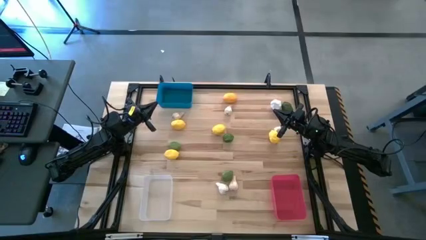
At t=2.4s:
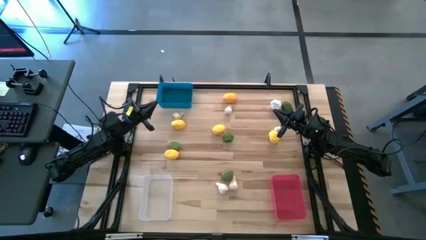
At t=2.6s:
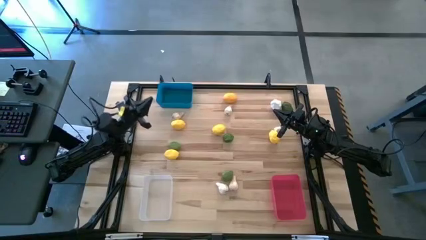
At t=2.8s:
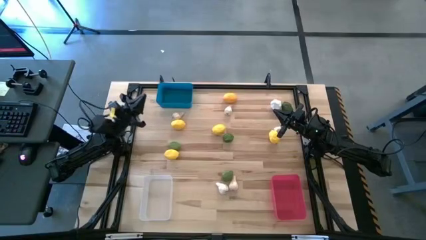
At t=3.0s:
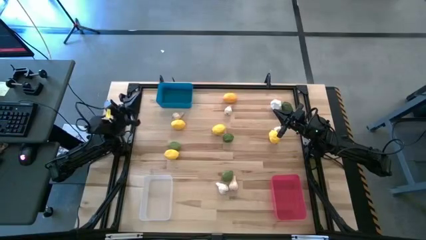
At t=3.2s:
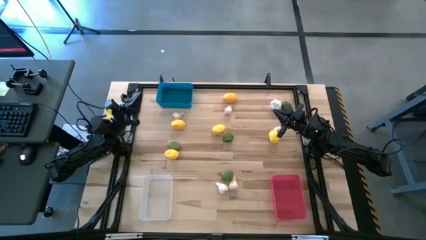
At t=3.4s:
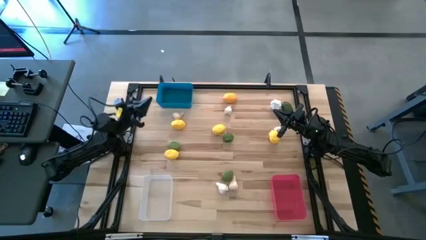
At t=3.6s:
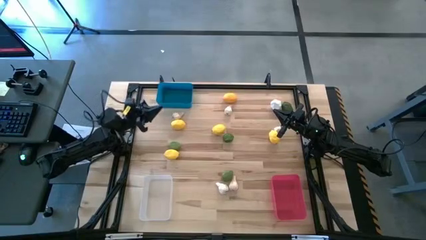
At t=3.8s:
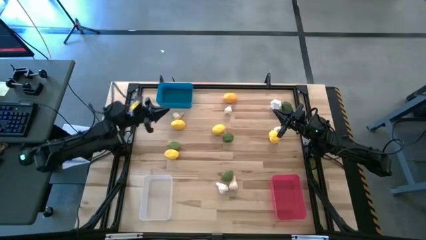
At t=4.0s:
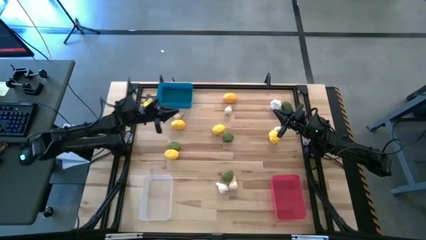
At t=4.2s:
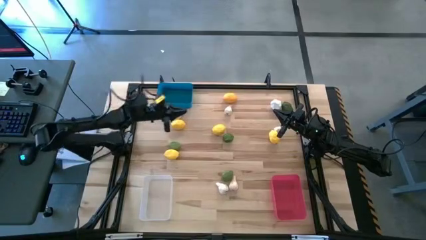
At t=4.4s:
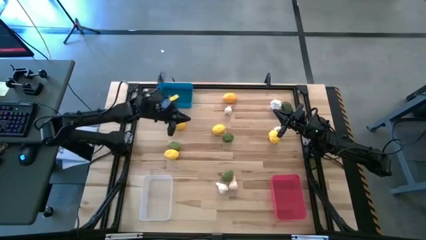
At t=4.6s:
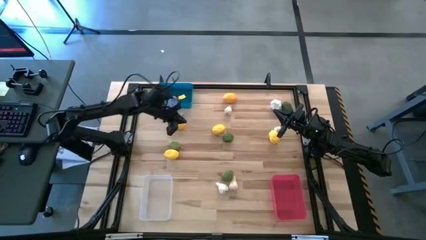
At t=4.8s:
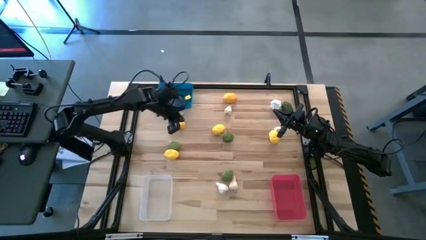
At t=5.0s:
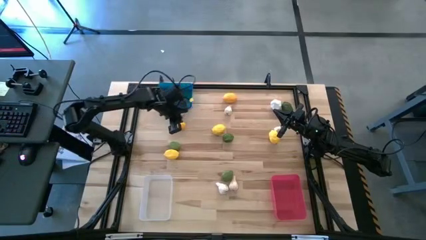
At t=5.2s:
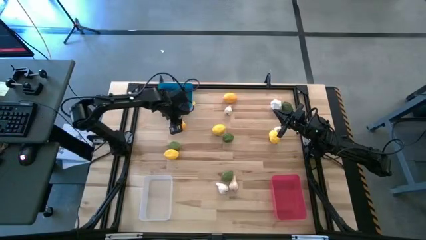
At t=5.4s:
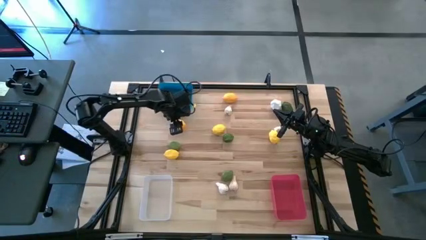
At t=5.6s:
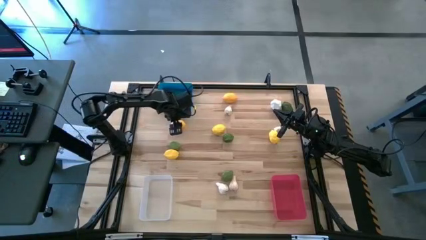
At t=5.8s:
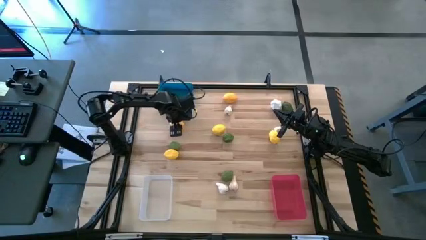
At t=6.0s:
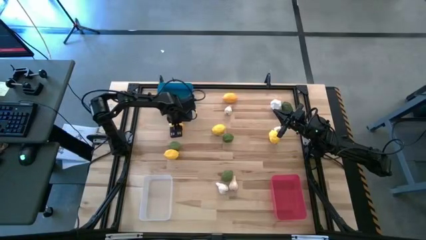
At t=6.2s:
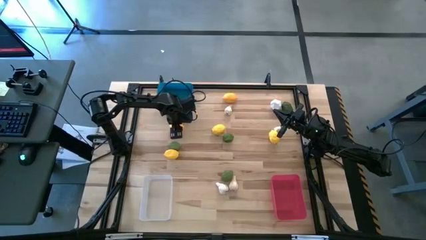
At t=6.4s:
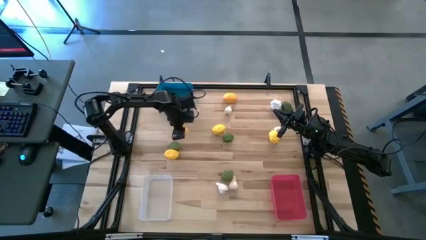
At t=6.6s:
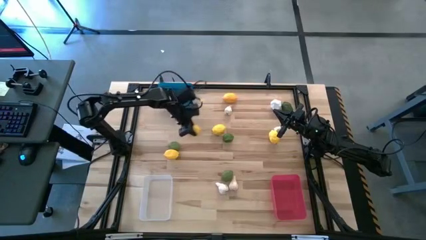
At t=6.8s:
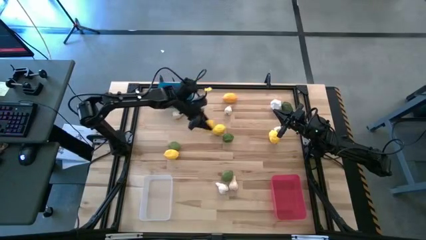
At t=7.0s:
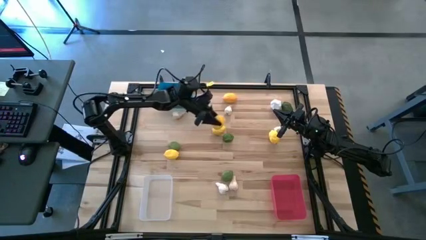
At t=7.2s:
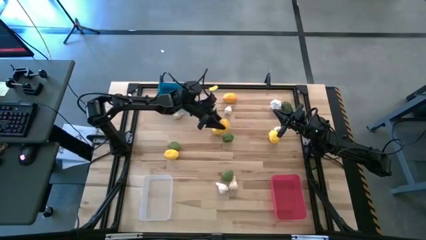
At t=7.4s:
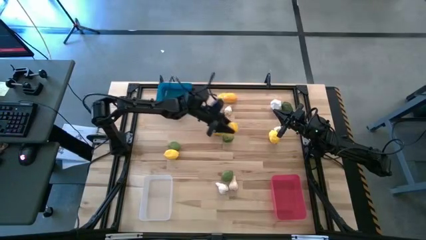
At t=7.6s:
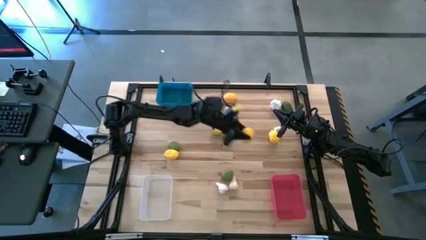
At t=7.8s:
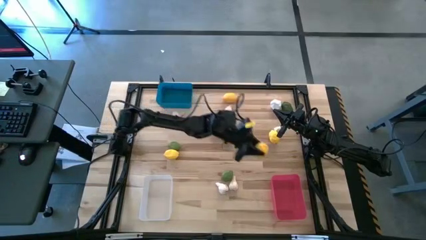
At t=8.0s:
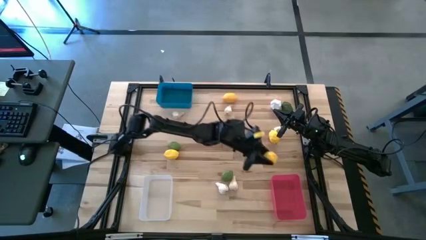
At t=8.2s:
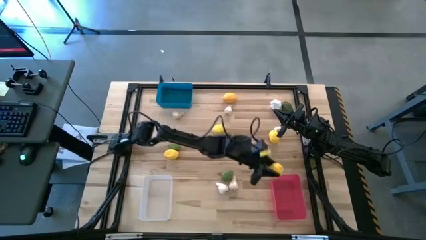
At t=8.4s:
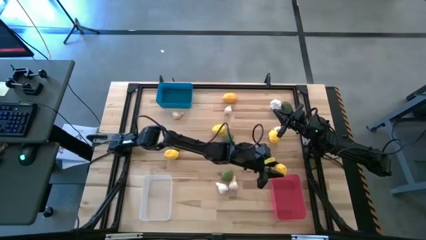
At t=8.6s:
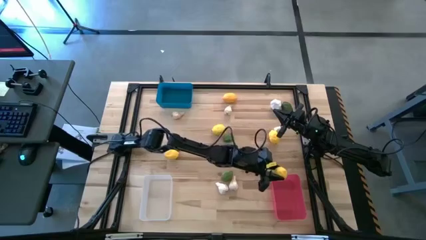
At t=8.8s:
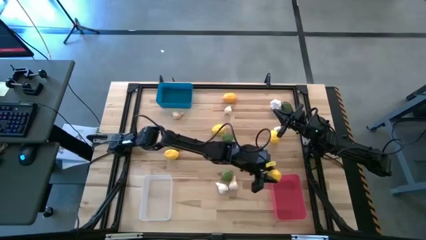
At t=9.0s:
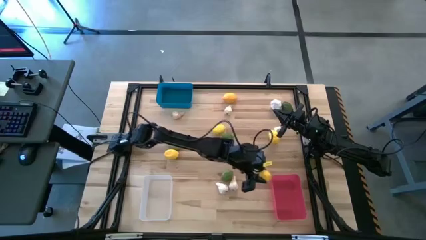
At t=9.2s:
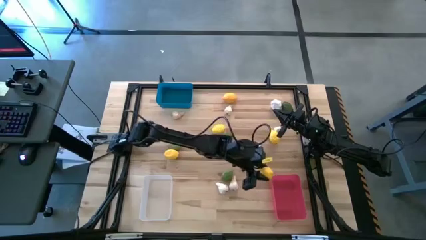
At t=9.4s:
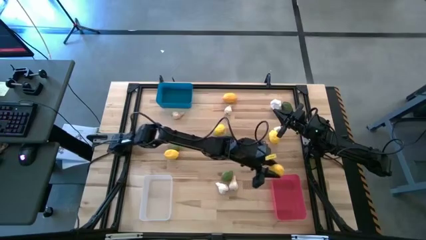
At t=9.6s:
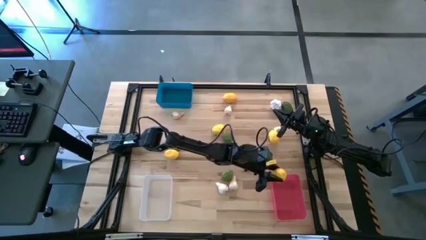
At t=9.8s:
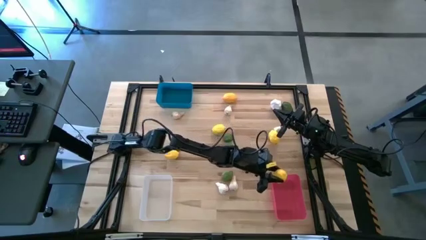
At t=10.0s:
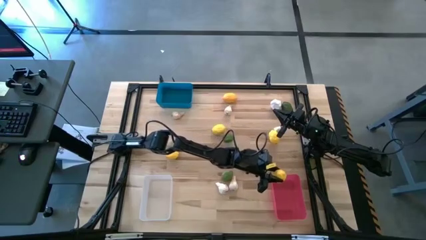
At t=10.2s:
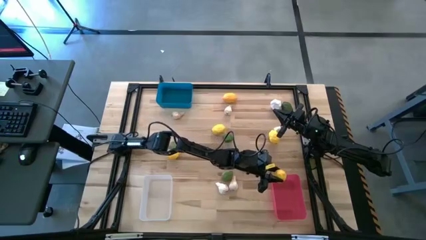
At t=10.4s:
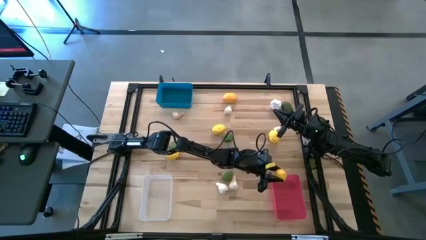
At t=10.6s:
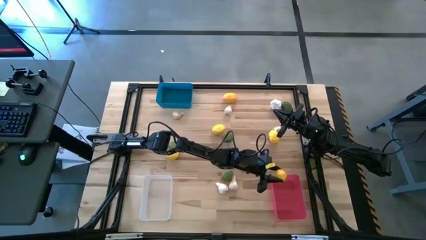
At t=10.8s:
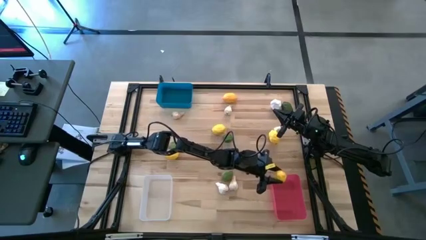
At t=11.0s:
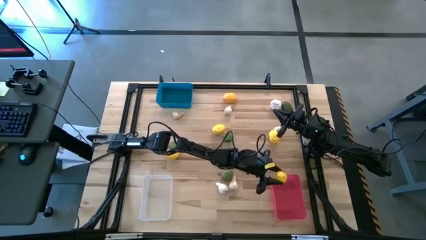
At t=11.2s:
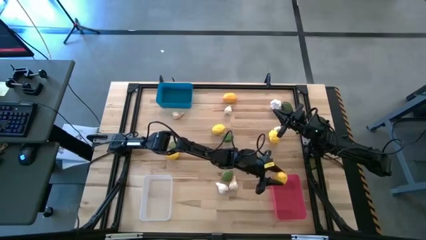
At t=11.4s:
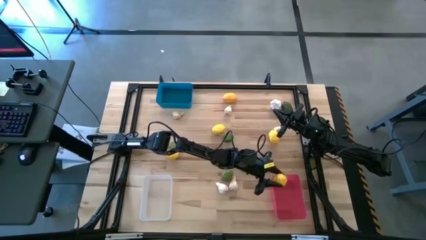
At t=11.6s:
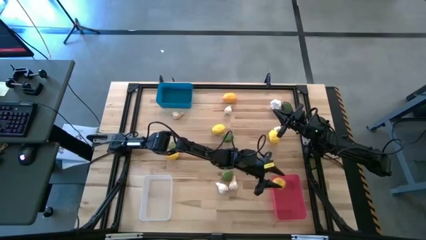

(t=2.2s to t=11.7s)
Task: Sort produce into baskets
Put the lemon into the red bin

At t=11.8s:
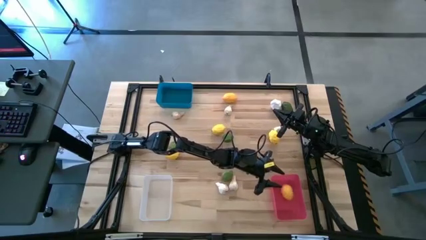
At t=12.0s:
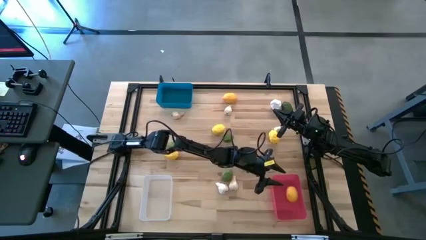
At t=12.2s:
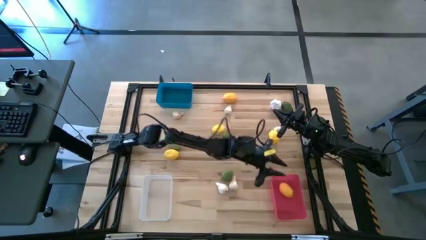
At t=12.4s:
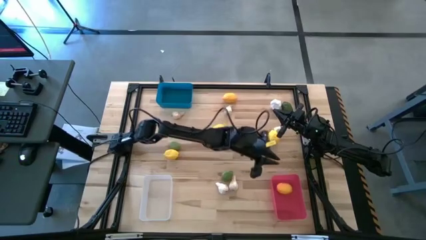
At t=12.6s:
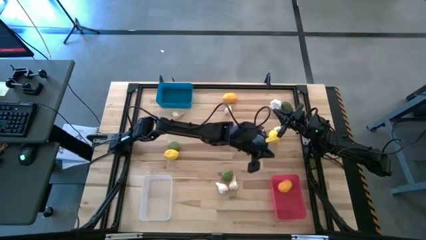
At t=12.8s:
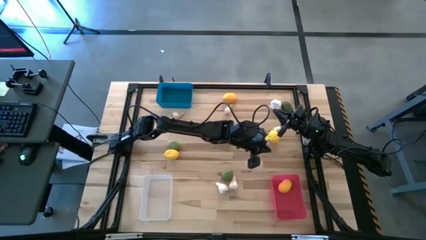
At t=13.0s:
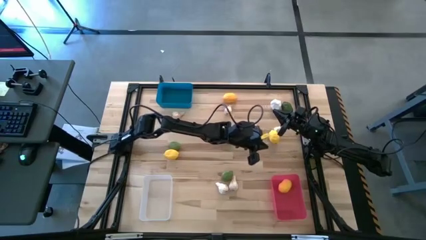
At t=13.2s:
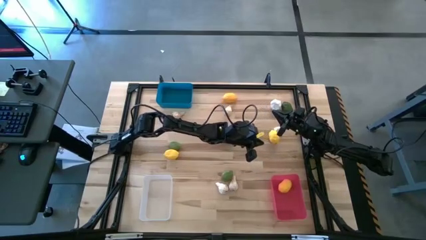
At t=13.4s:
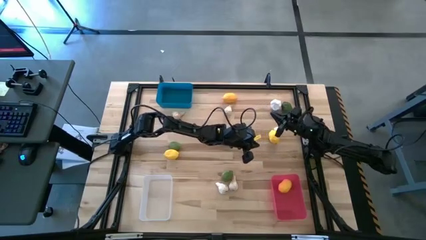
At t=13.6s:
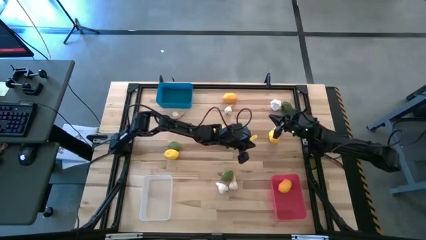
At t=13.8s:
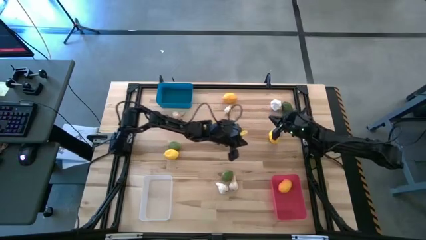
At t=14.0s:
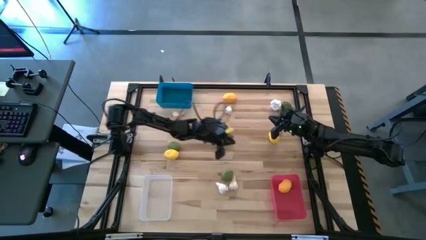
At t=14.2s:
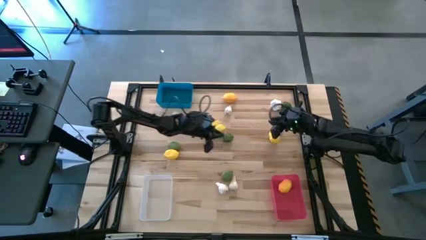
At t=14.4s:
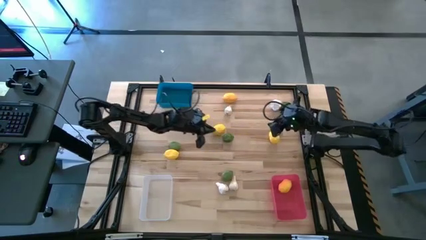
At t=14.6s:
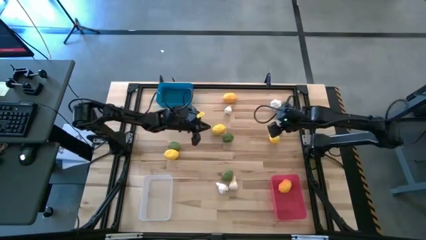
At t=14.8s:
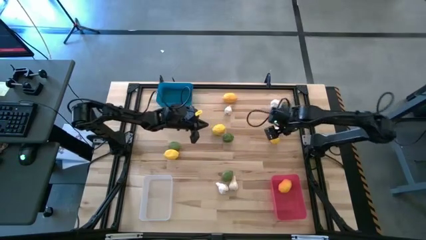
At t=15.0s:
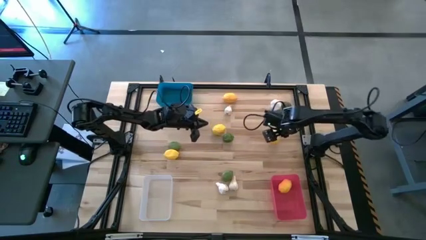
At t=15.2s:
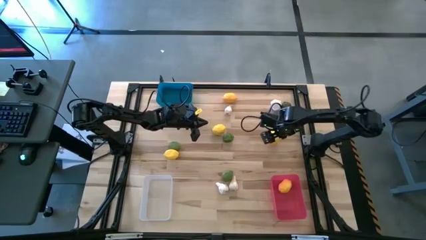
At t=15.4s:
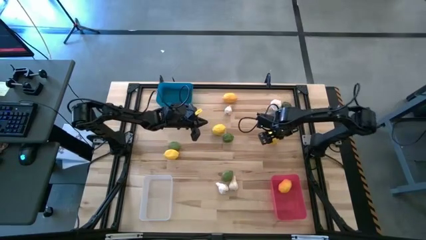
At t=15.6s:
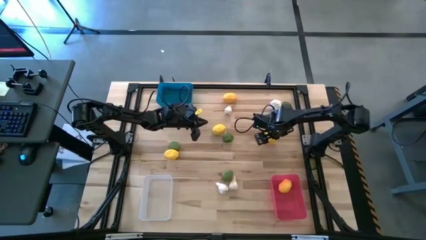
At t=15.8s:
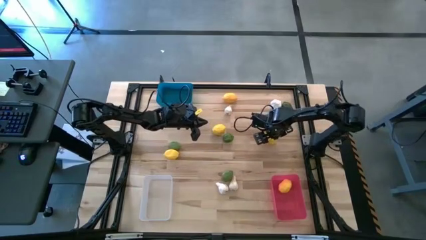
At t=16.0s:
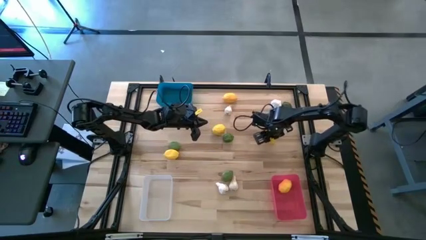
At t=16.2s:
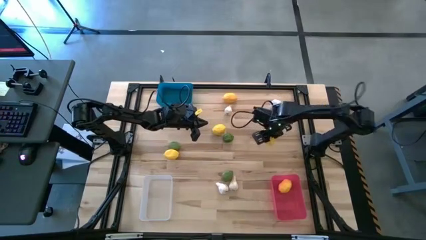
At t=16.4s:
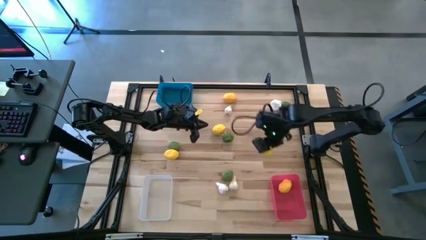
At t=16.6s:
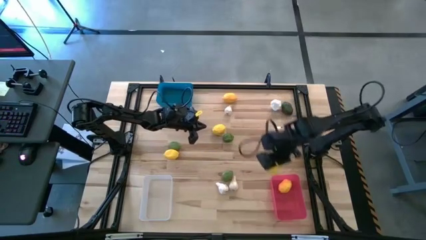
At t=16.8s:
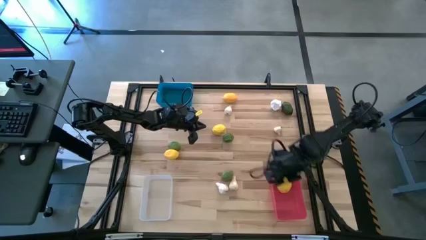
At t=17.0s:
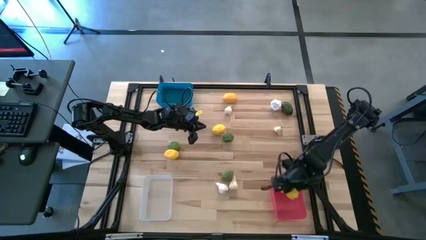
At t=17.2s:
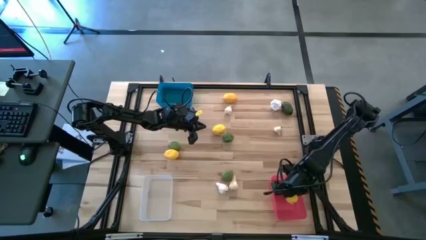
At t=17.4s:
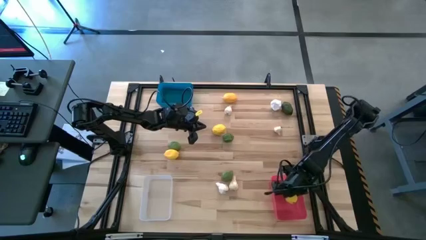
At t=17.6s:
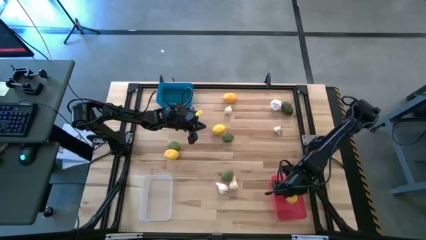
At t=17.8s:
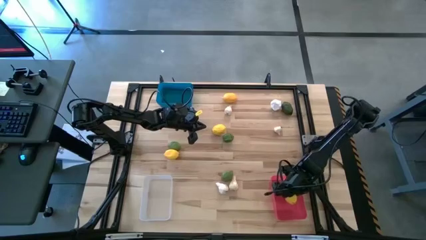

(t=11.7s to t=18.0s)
Put the lemon into the red bin
